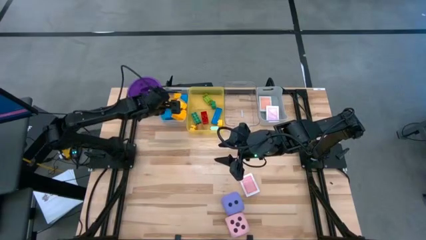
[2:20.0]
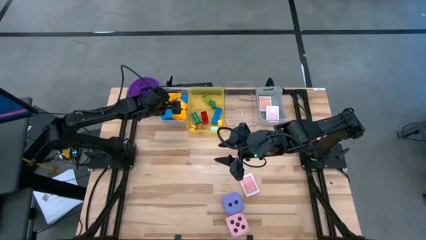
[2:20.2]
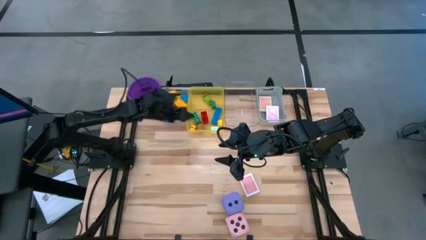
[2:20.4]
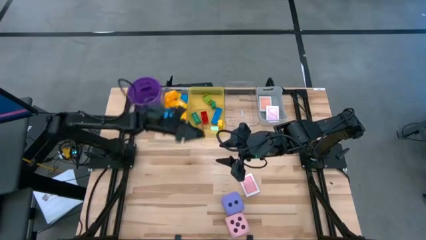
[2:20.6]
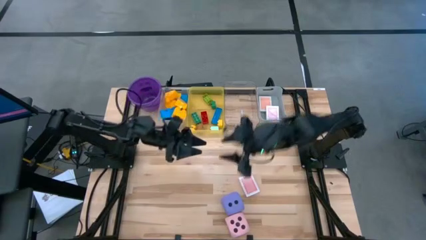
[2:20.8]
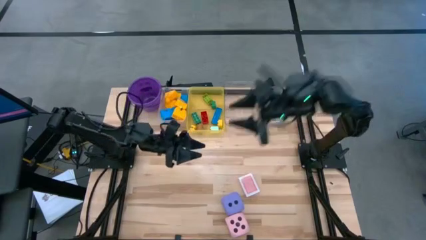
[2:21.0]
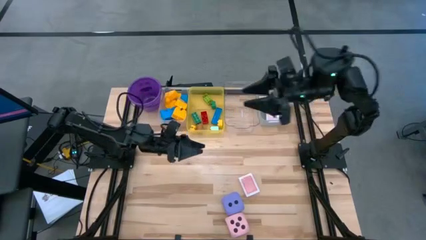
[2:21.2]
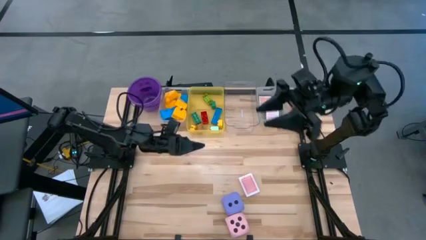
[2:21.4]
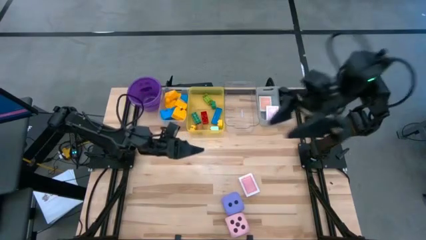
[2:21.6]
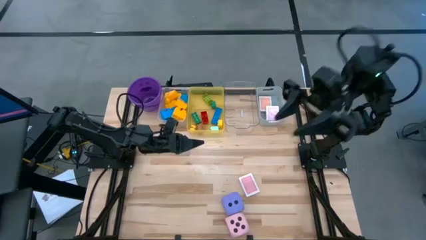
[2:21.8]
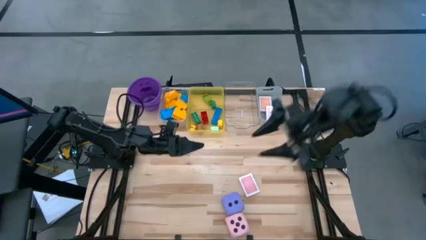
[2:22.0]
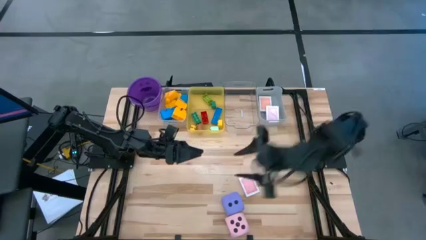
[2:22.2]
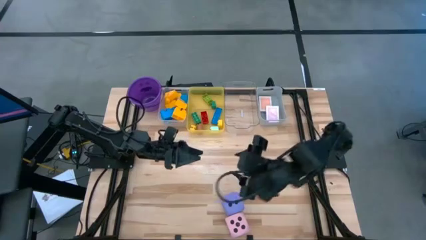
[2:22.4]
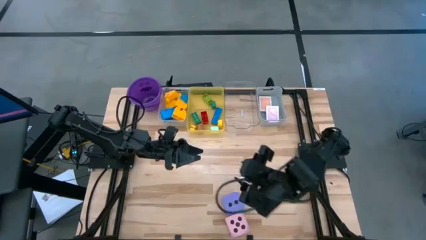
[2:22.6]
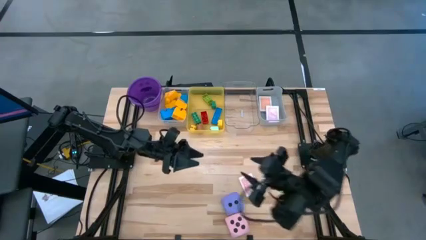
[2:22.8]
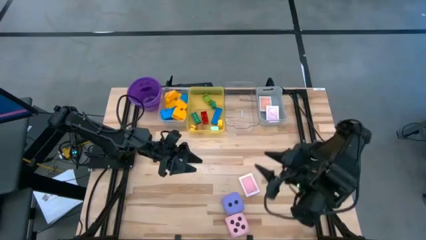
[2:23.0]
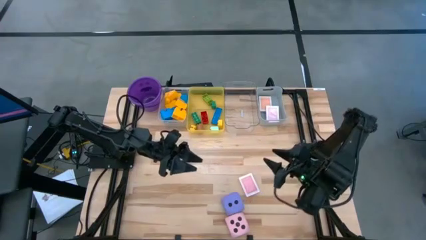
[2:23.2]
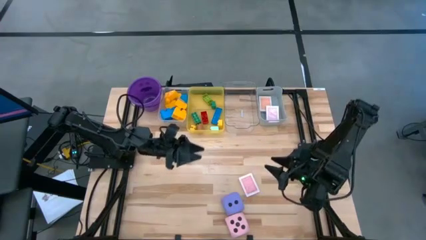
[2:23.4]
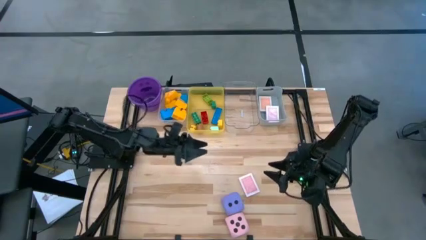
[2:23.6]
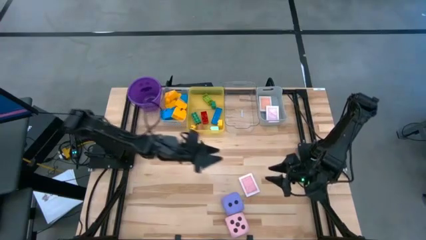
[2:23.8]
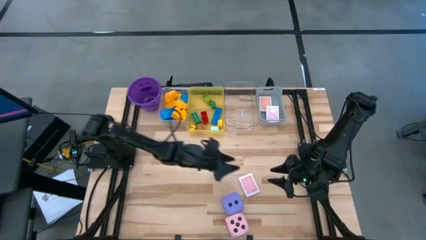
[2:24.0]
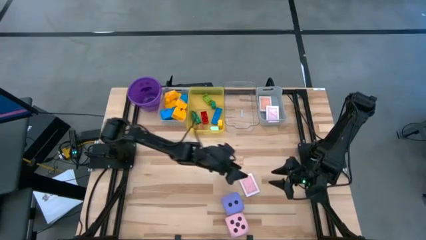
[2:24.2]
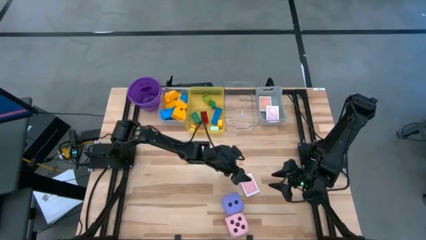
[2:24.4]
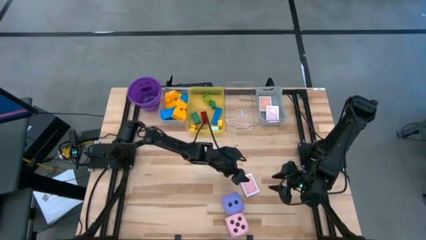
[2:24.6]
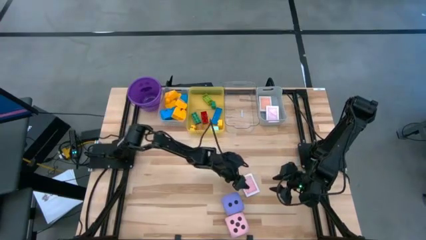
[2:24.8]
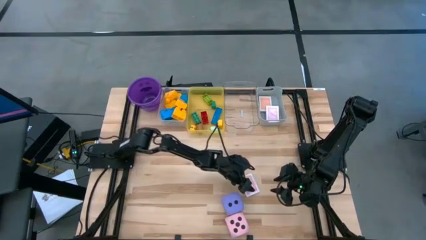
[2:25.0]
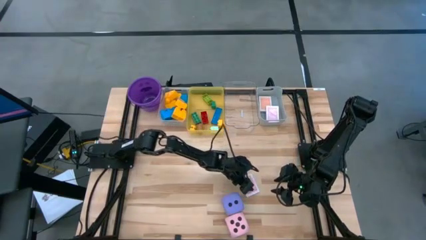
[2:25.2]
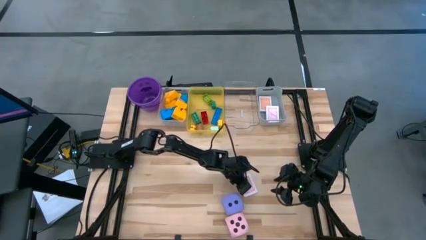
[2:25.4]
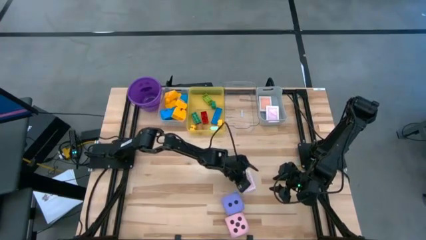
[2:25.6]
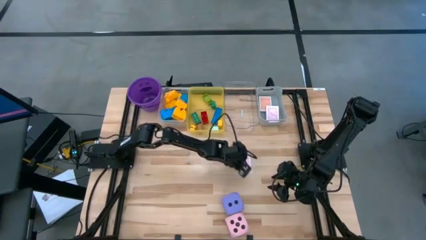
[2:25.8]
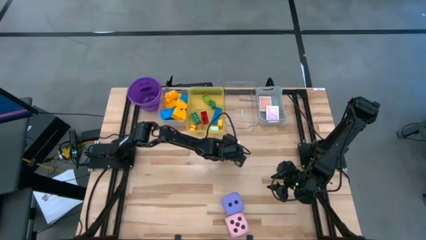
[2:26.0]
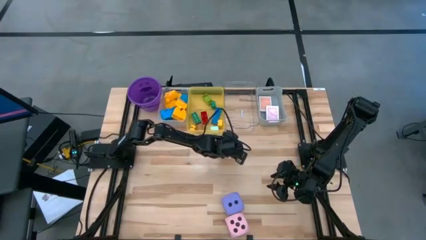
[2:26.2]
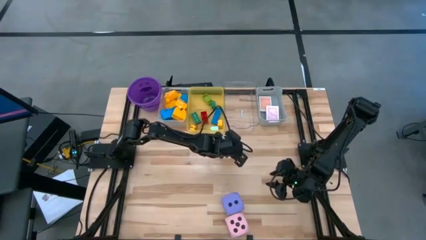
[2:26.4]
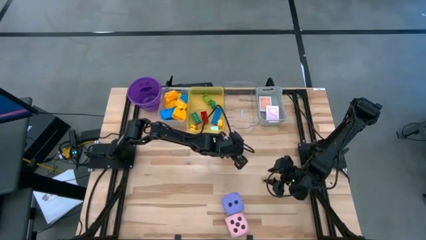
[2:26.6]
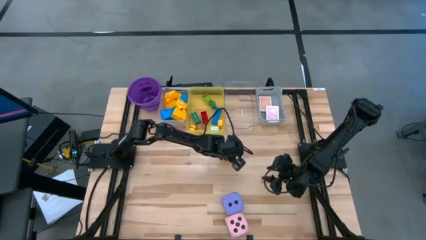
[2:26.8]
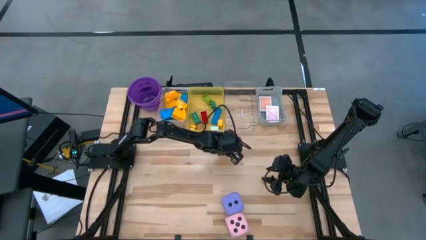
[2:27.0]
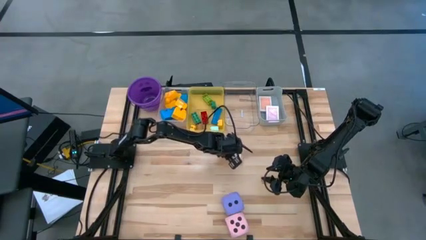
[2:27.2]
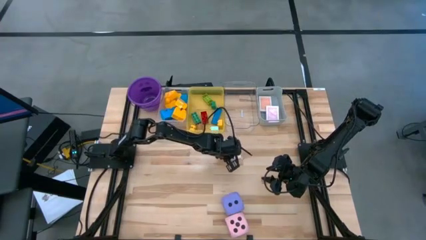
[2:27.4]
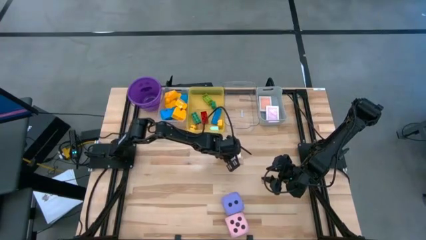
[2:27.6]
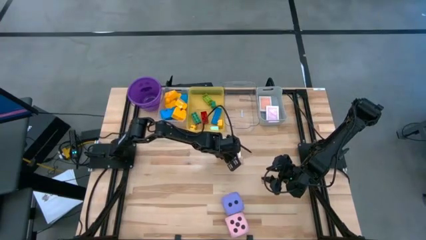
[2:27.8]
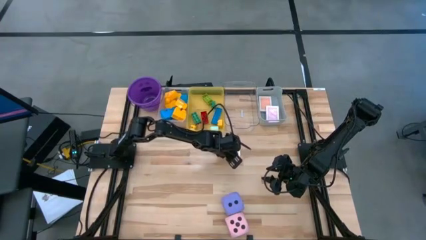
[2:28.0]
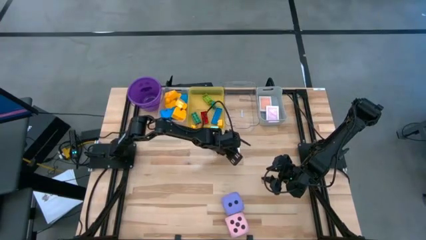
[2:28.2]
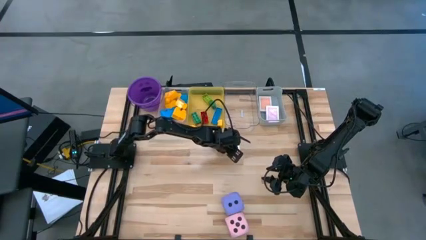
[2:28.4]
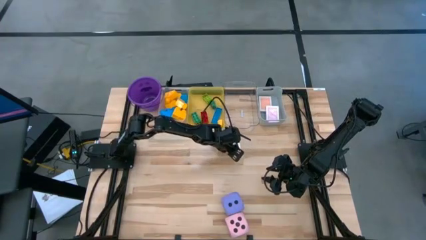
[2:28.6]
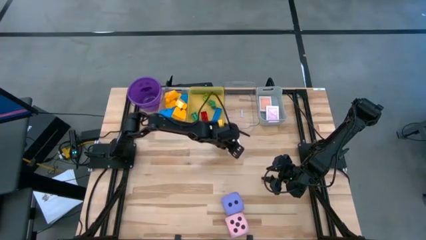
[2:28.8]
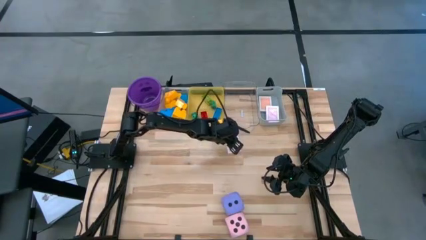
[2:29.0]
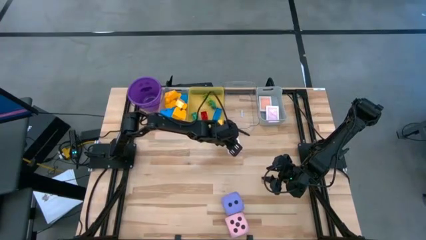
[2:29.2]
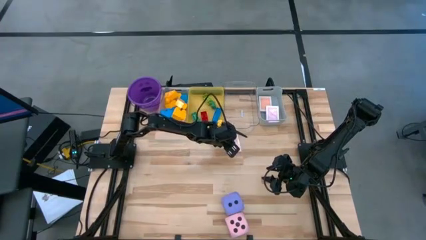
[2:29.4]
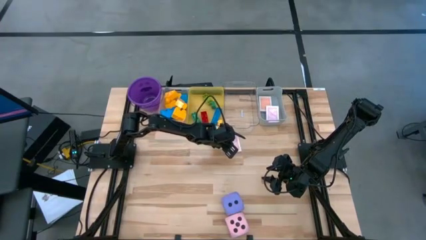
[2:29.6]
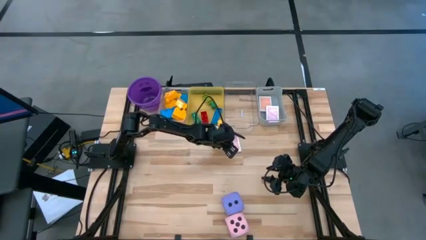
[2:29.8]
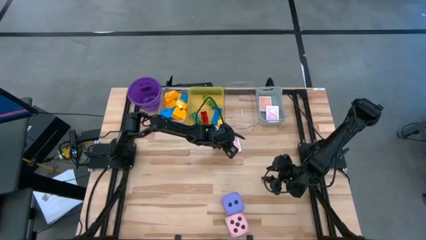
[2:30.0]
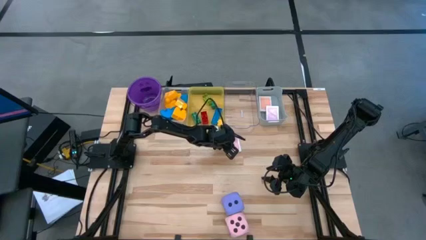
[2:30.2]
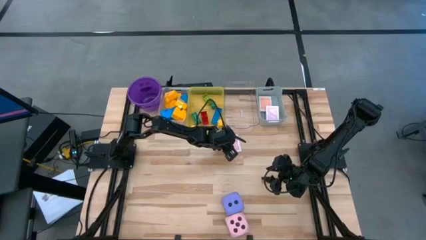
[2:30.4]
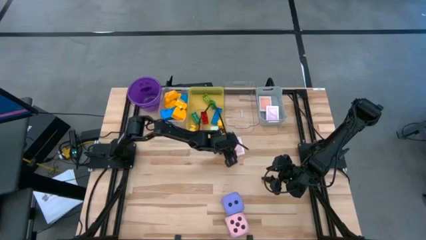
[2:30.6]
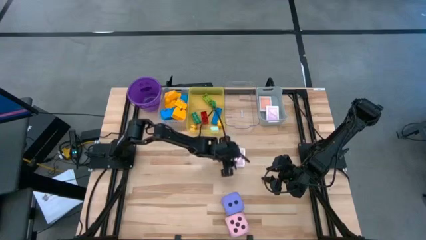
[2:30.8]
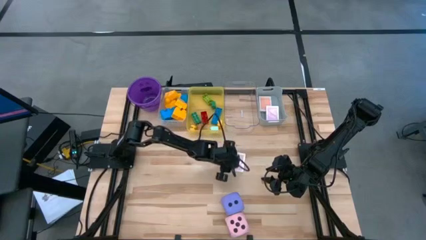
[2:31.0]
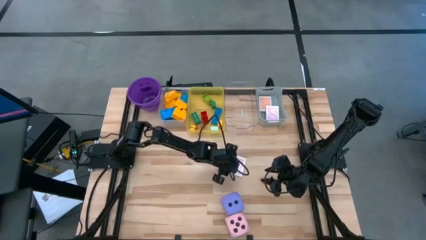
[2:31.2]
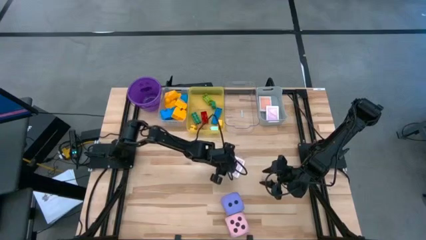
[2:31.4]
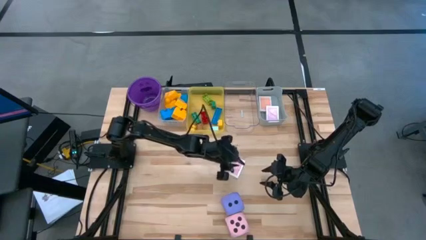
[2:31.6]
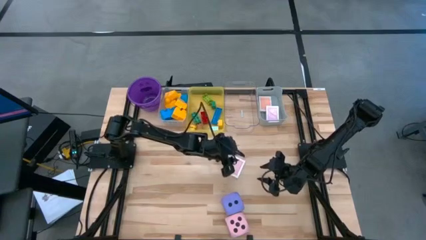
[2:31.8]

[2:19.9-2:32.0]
Task: Pick & Place Toys
Put the red deck of cards into the gray bin

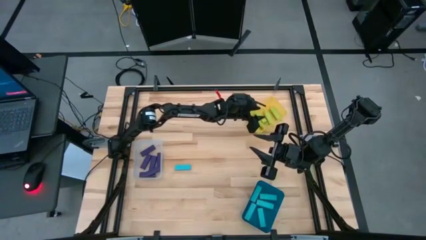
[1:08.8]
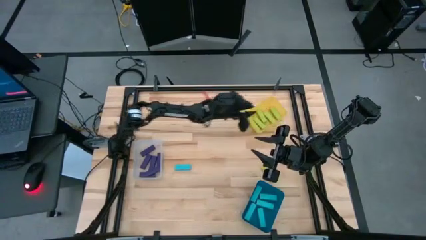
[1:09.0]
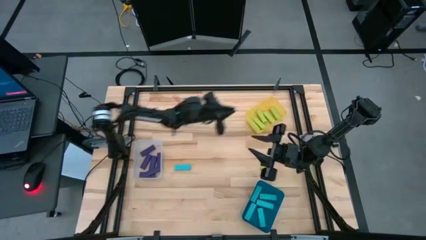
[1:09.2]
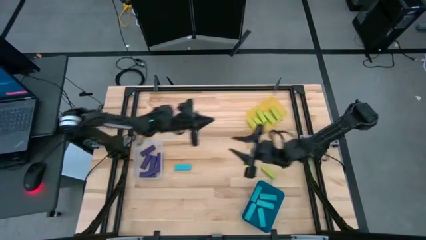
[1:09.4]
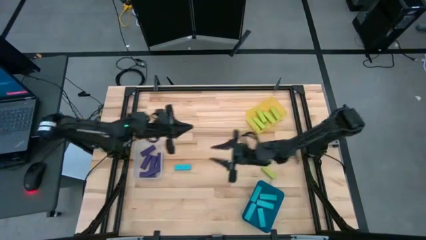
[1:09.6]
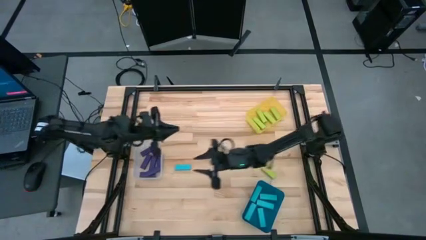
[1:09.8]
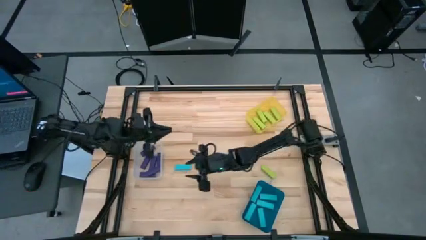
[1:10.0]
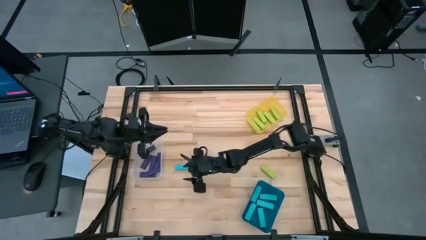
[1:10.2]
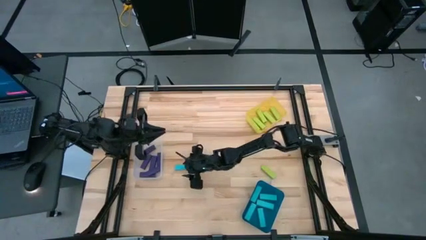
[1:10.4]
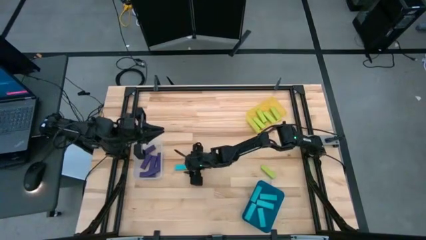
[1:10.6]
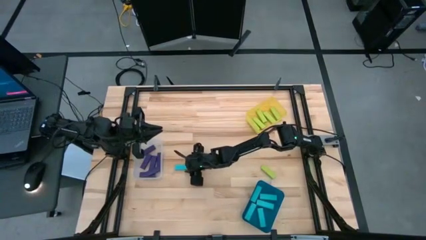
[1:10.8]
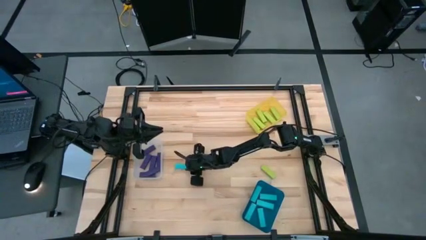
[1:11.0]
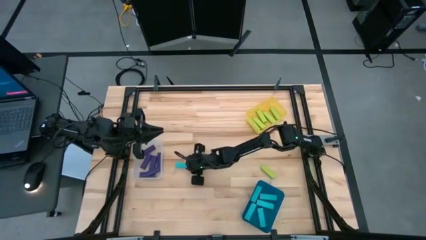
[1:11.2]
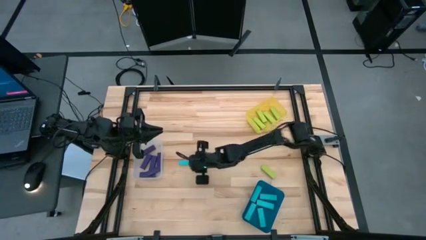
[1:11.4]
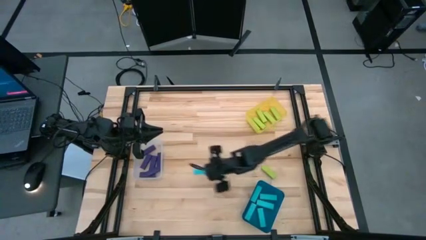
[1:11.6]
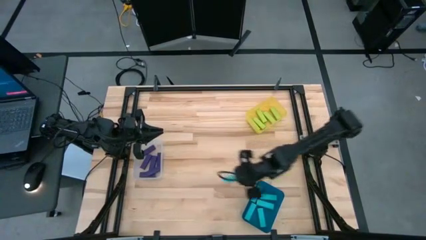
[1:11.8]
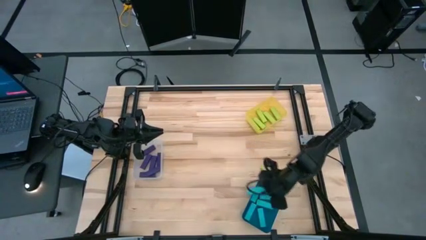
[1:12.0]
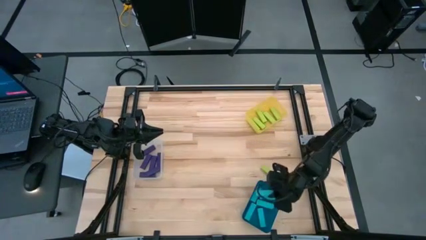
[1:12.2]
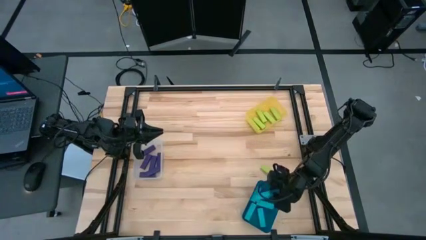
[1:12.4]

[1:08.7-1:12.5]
Task: Sort blocks
Put the light blue block into the blue bin
